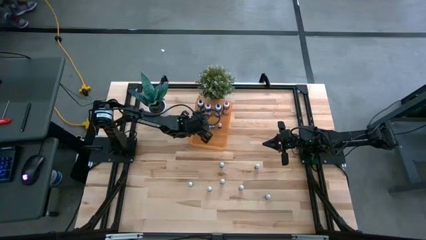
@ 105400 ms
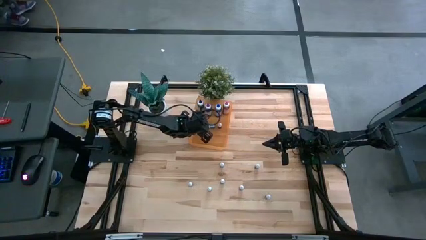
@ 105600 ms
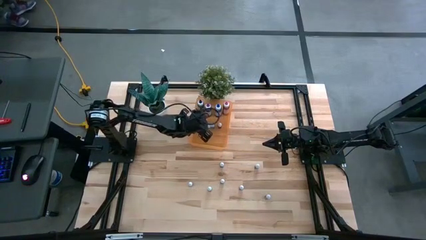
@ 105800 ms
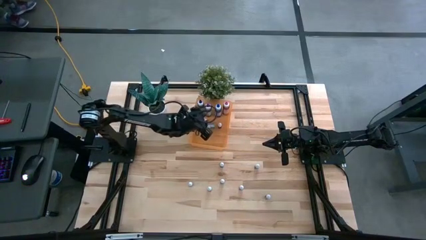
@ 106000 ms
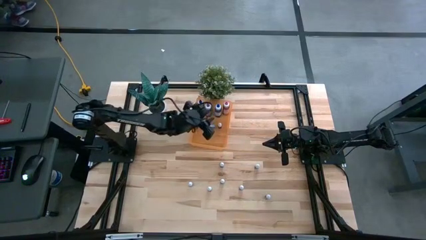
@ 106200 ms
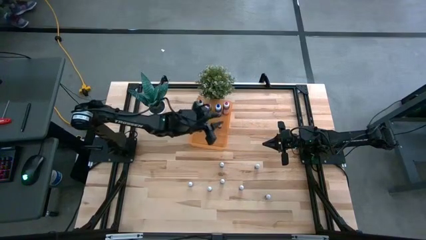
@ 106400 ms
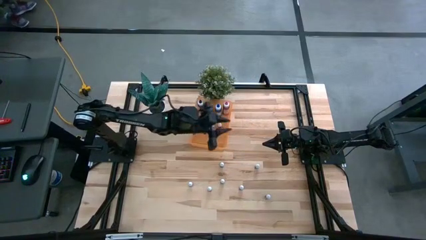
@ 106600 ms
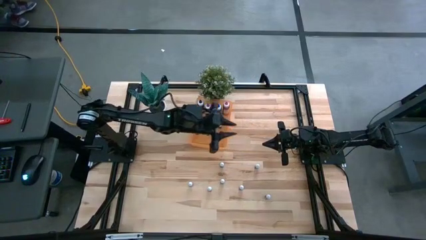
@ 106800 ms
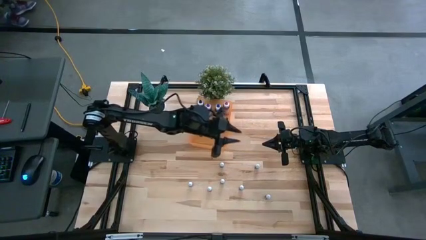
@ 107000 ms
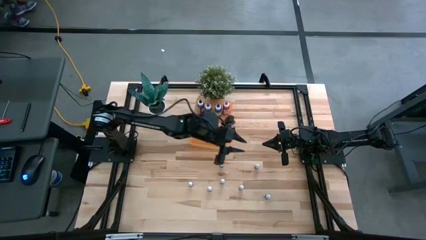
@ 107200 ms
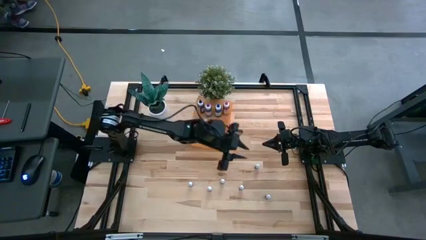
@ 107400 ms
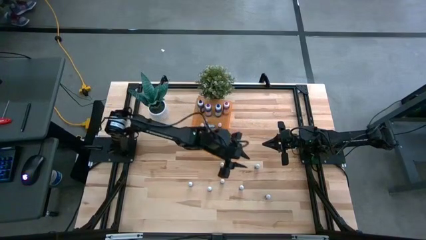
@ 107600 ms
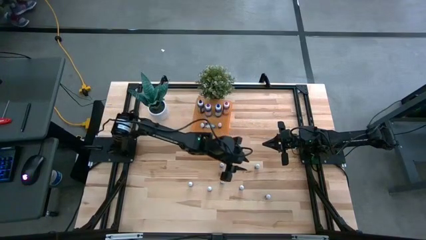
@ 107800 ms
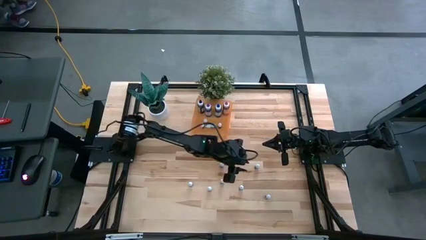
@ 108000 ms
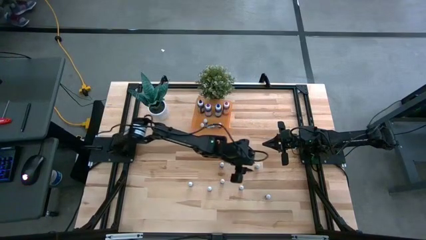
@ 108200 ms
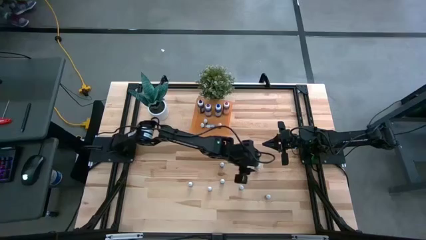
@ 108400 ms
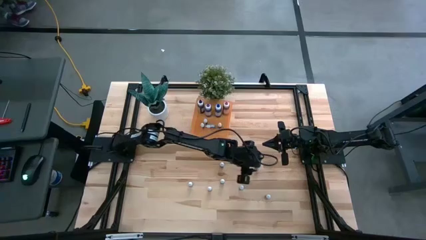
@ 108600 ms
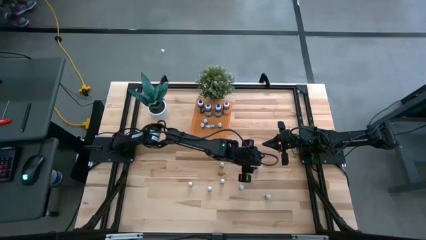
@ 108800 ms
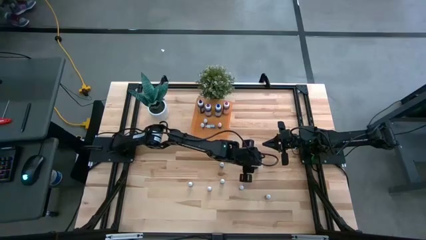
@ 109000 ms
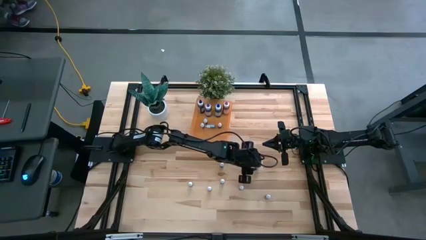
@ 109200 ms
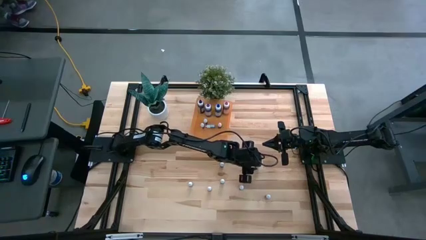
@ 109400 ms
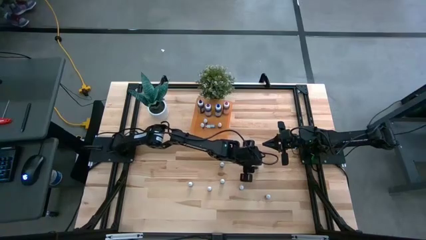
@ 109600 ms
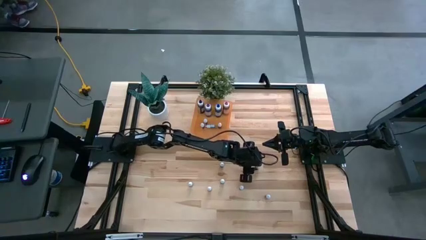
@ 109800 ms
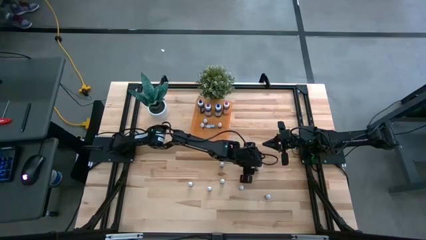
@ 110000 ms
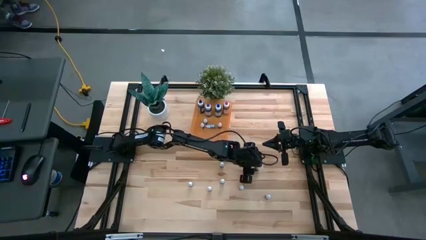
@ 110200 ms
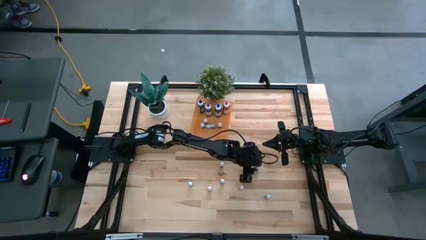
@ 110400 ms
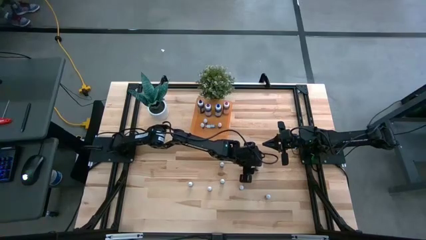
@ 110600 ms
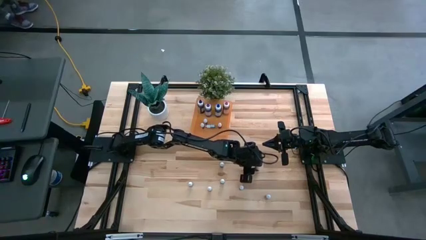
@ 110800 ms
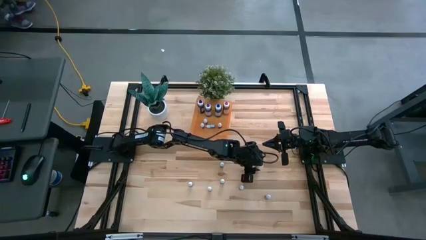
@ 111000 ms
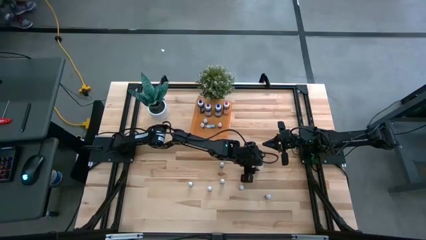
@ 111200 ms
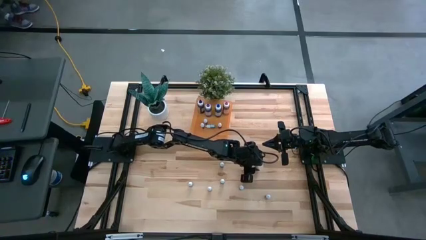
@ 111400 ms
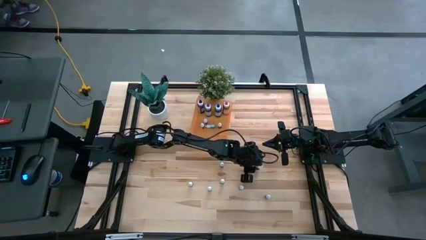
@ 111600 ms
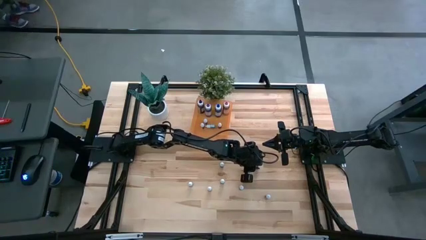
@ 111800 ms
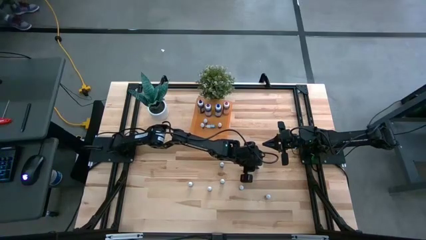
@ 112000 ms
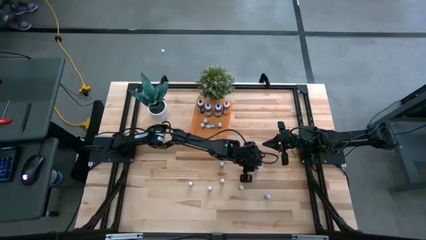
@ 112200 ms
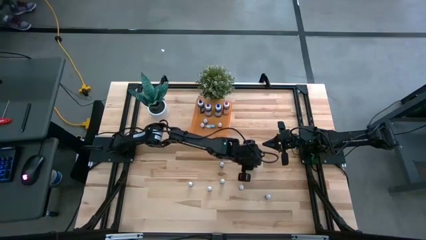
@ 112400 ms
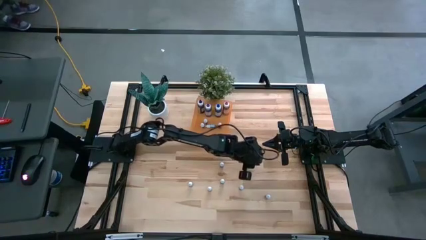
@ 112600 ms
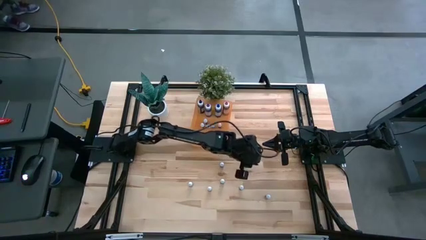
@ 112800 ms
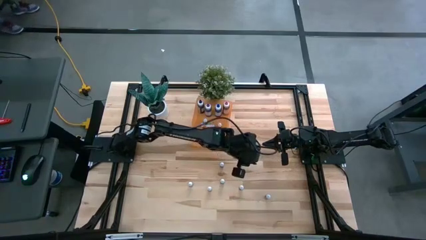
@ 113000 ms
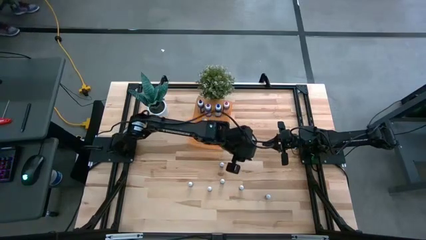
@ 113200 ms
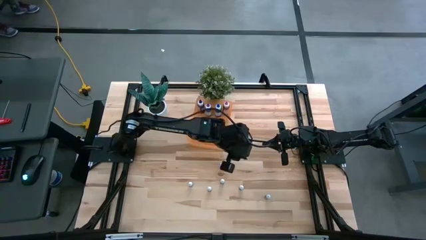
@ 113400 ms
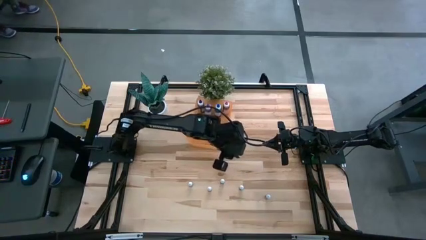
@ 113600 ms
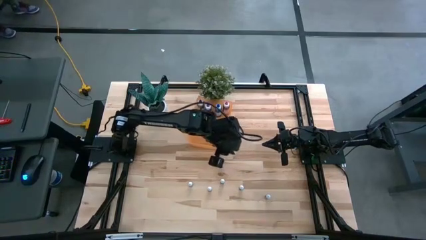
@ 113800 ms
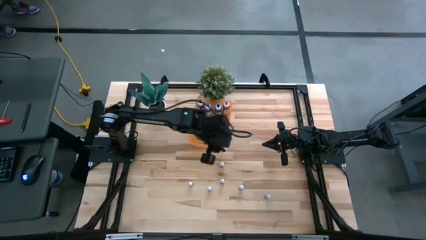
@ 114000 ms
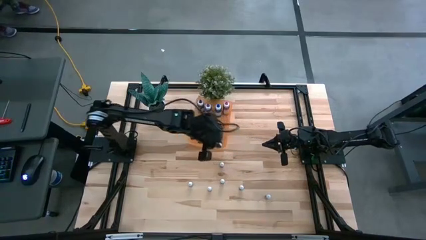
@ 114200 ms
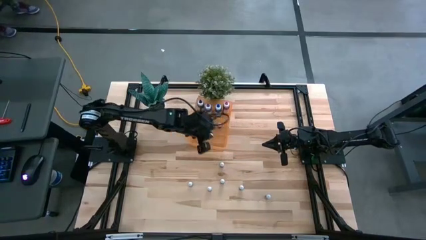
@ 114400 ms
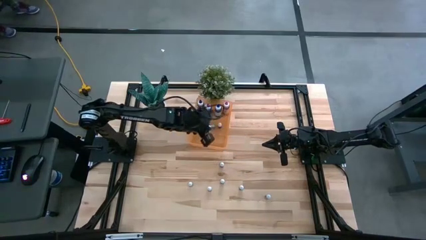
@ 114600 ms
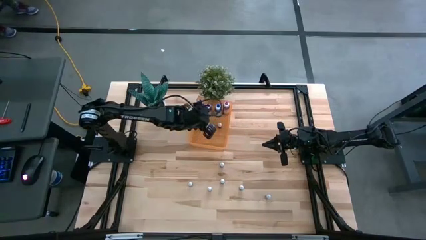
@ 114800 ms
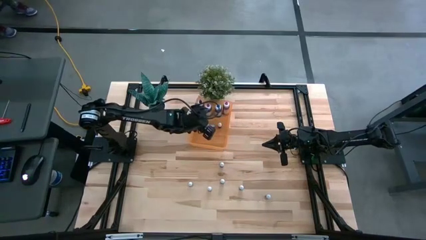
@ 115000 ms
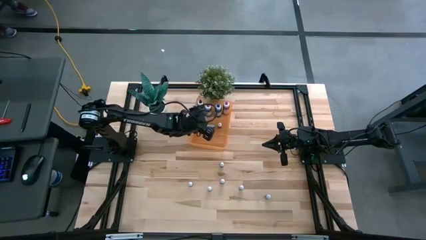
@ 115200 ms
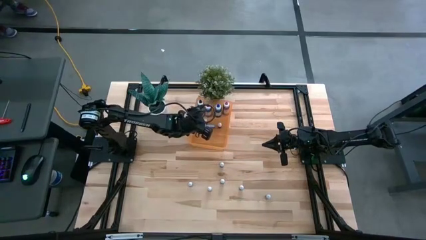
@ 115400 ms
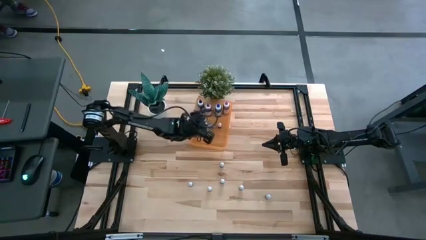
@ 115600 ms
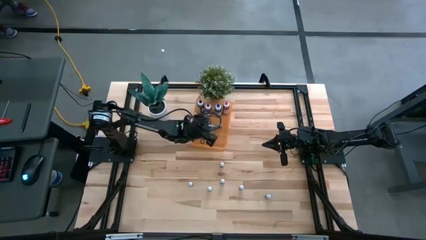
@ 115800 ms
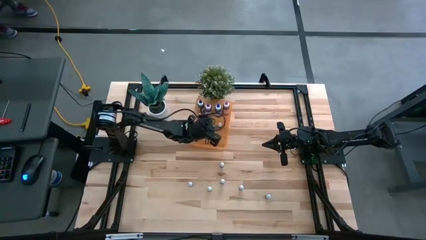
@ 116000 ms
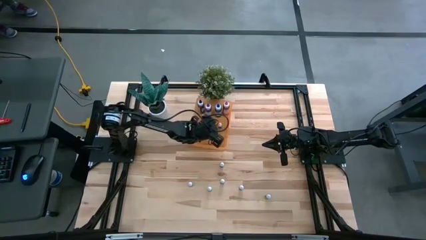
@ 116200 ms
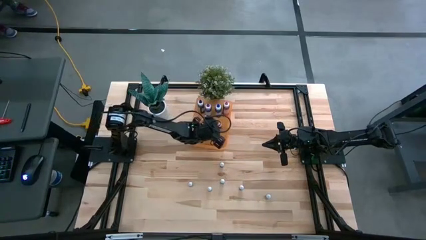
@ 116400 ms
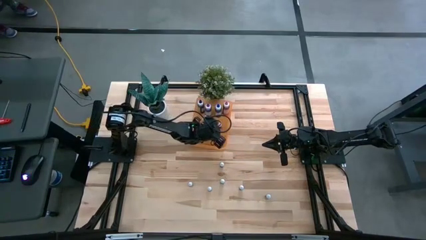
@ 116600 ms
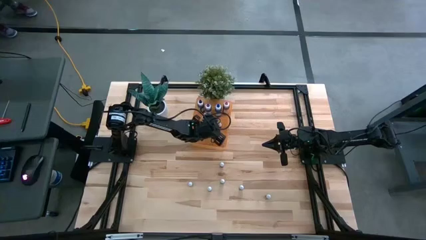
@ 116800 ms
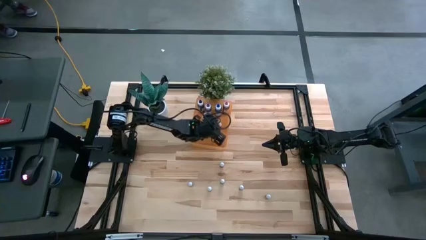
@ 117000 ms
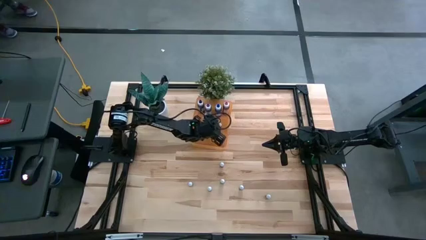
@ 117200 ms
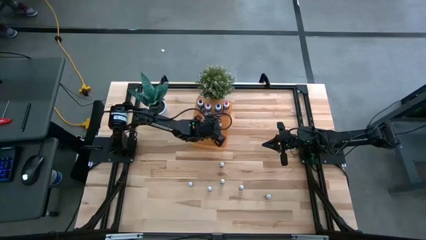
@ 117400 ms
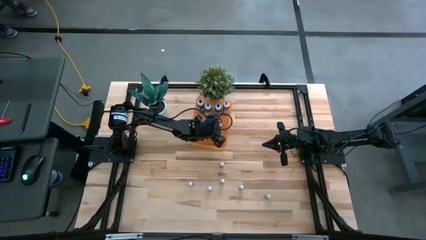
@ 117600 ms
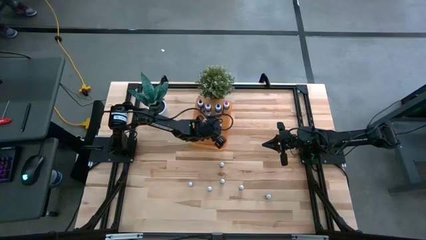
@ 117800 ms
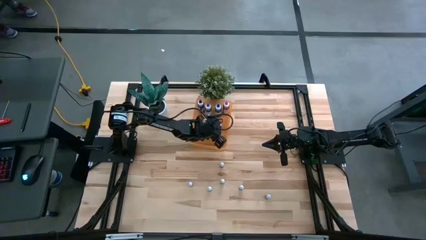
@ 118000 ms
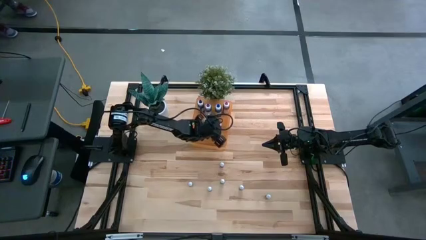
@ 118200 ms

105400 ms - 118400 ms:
Task: Pick & Place food coloring
Put the right small black food coloring bottle into the orange bin
